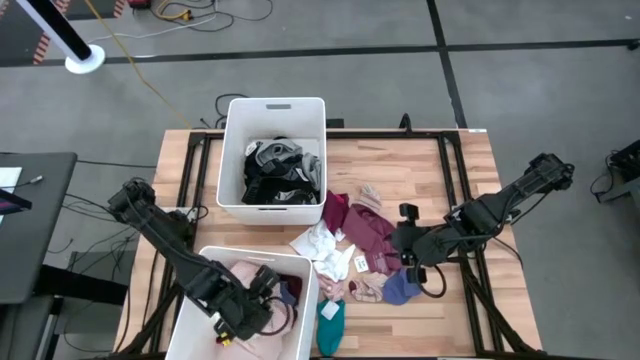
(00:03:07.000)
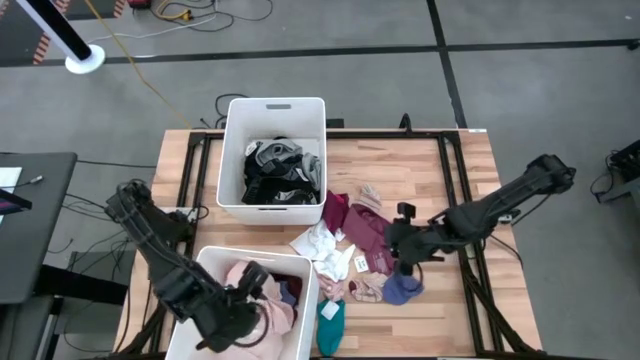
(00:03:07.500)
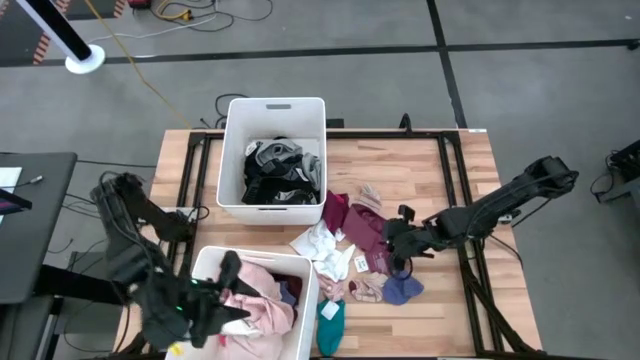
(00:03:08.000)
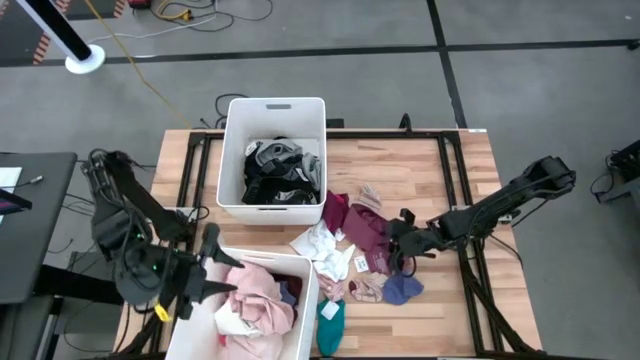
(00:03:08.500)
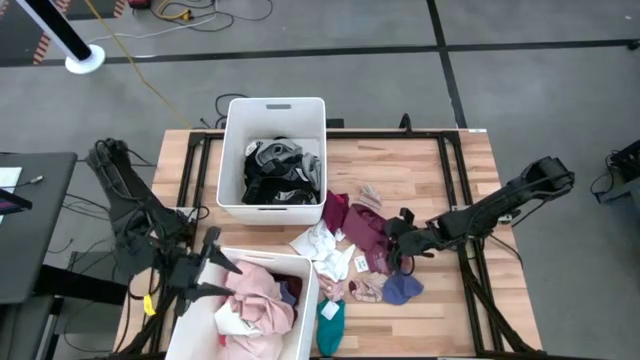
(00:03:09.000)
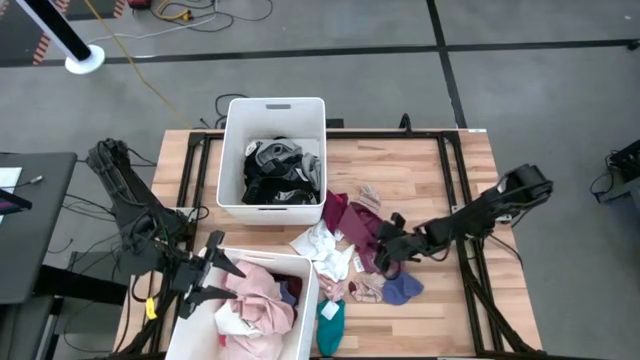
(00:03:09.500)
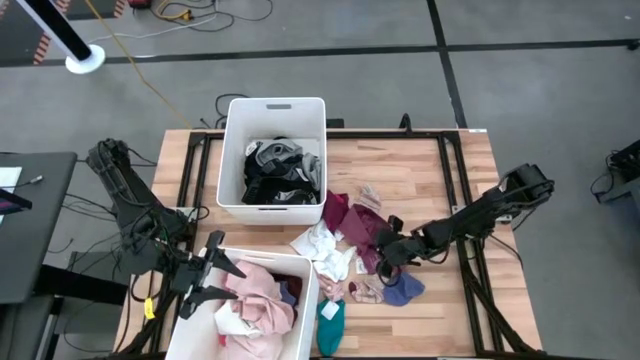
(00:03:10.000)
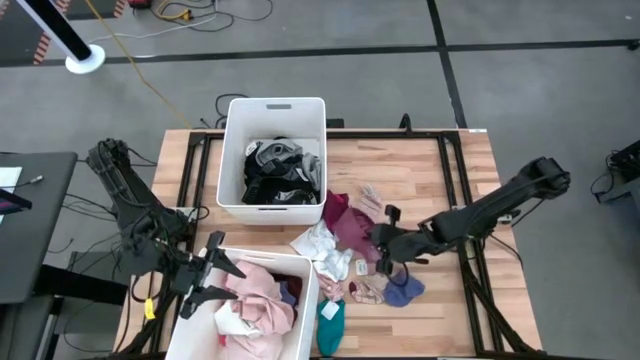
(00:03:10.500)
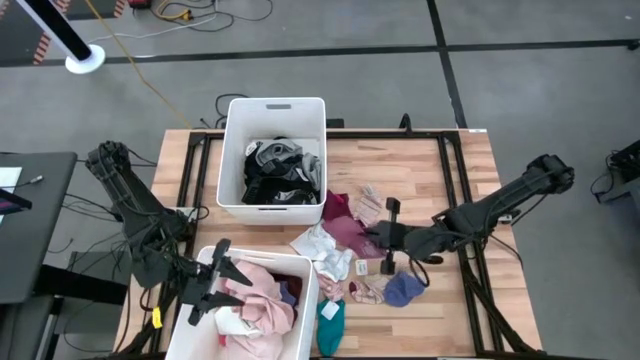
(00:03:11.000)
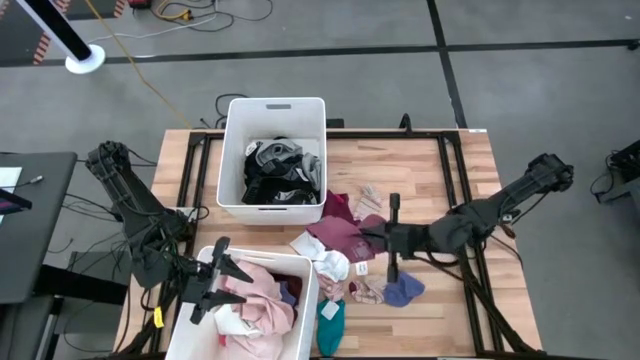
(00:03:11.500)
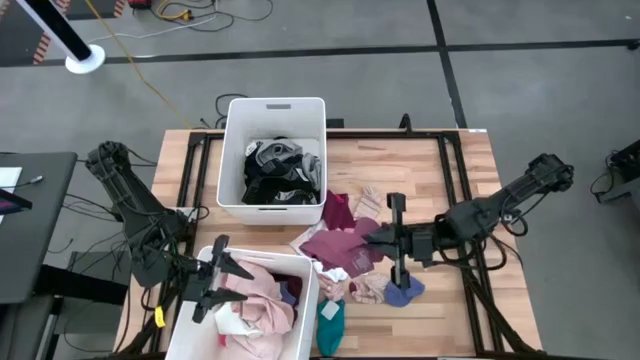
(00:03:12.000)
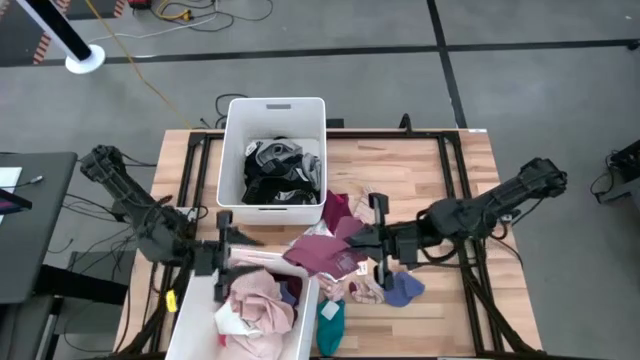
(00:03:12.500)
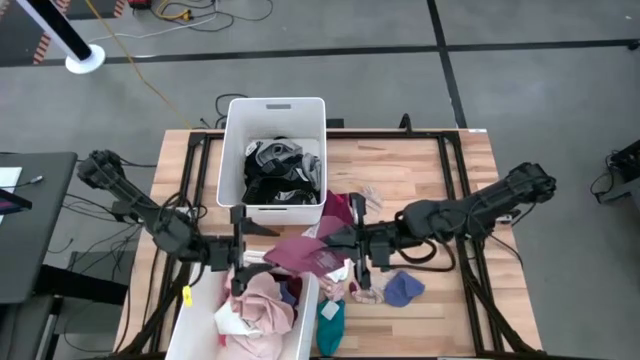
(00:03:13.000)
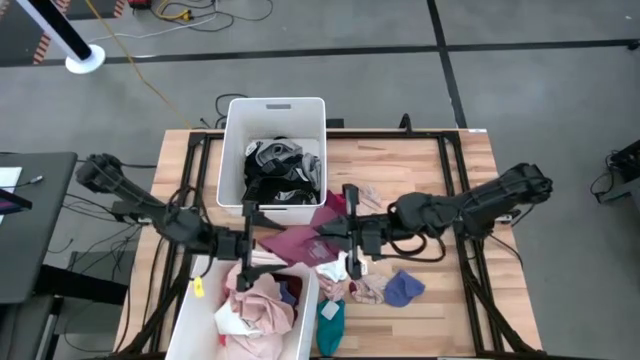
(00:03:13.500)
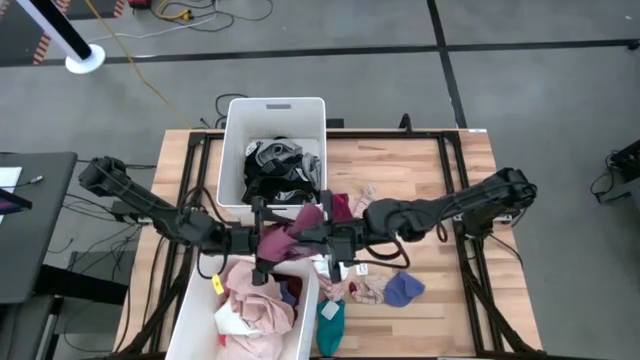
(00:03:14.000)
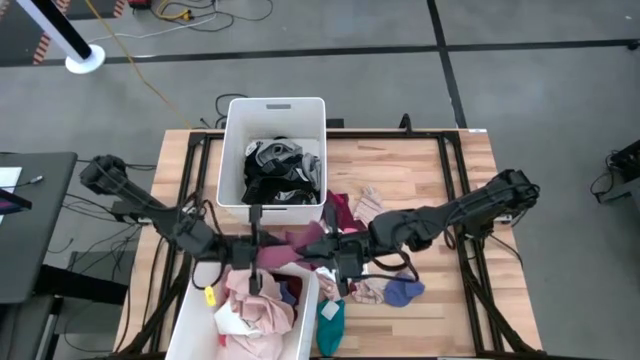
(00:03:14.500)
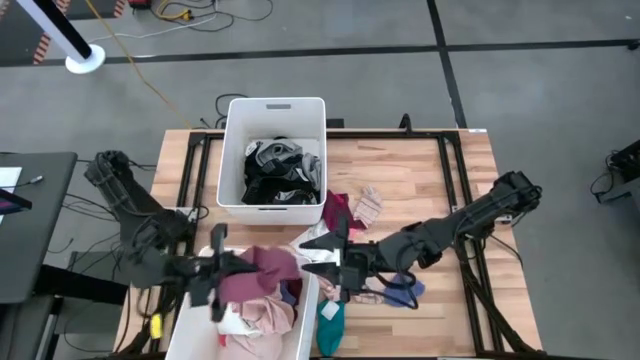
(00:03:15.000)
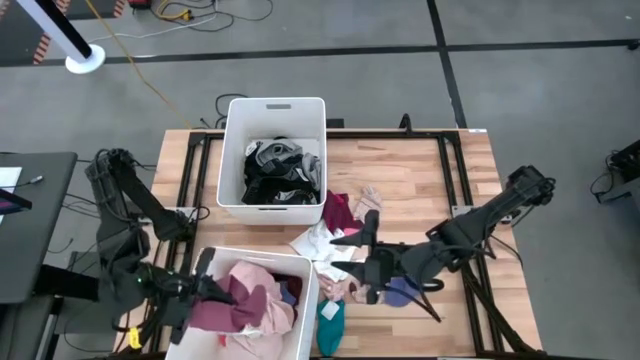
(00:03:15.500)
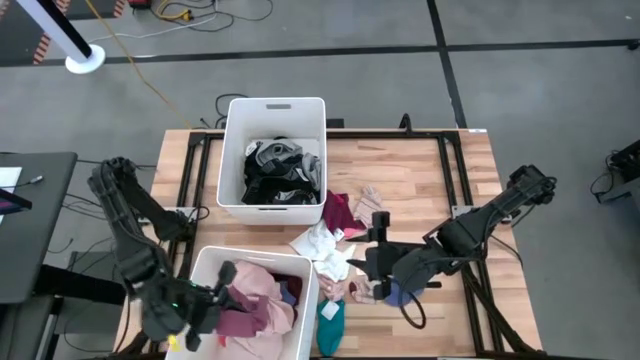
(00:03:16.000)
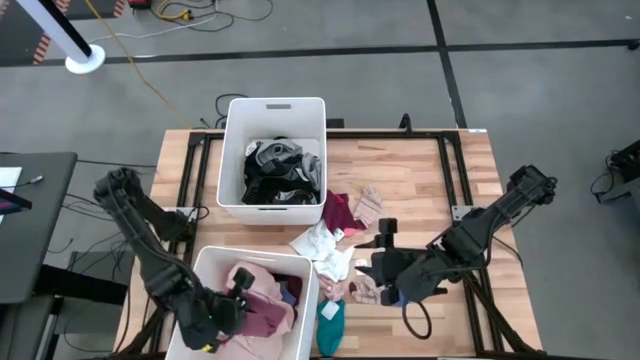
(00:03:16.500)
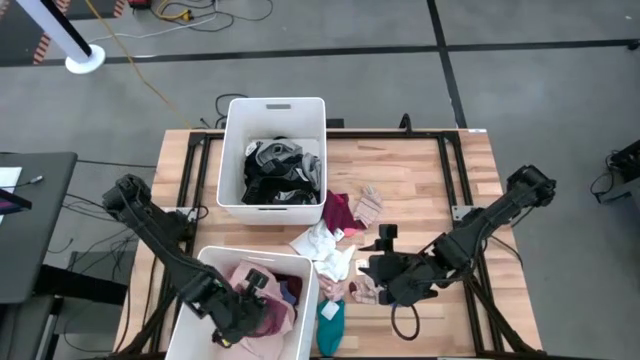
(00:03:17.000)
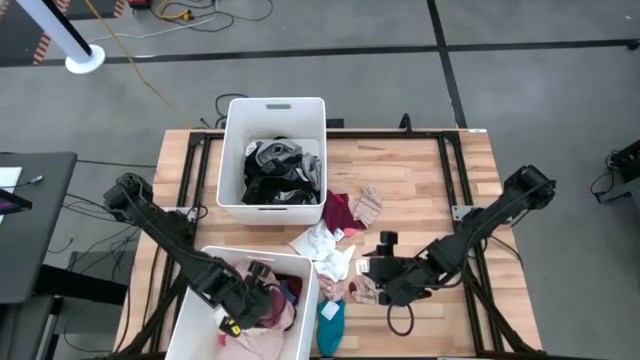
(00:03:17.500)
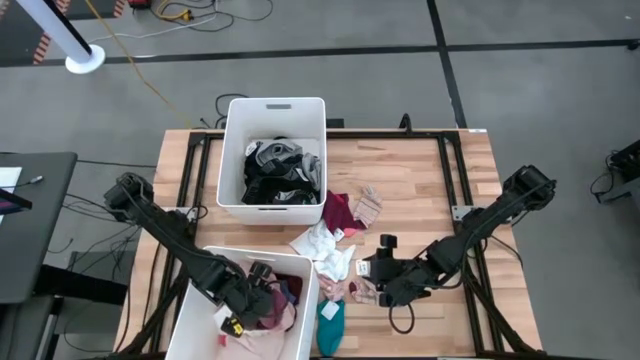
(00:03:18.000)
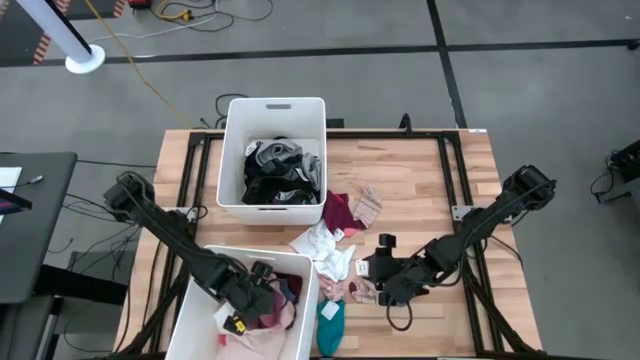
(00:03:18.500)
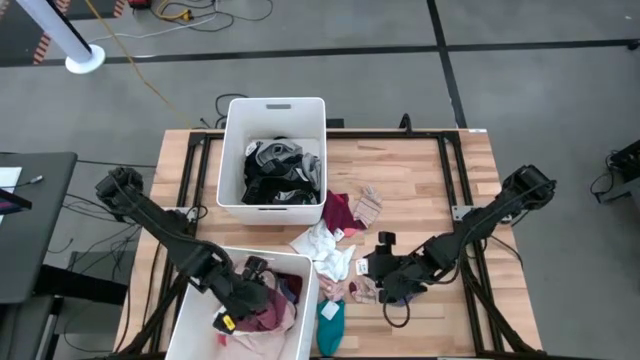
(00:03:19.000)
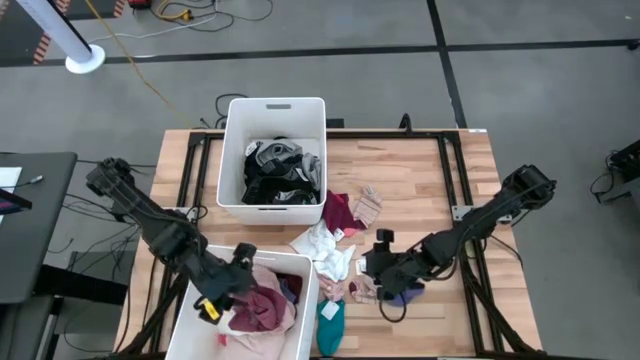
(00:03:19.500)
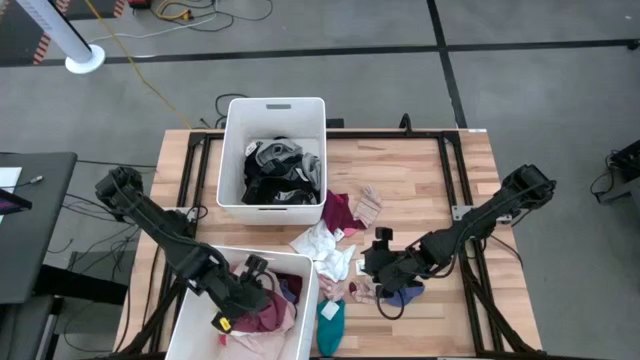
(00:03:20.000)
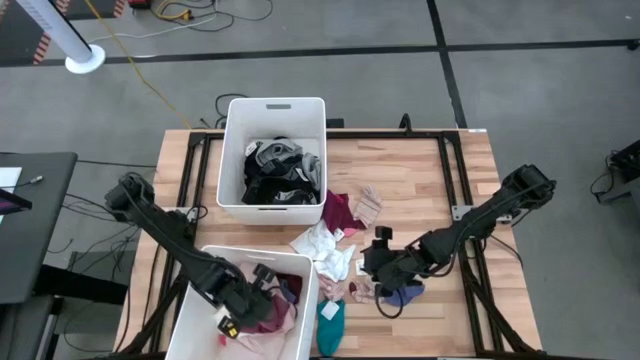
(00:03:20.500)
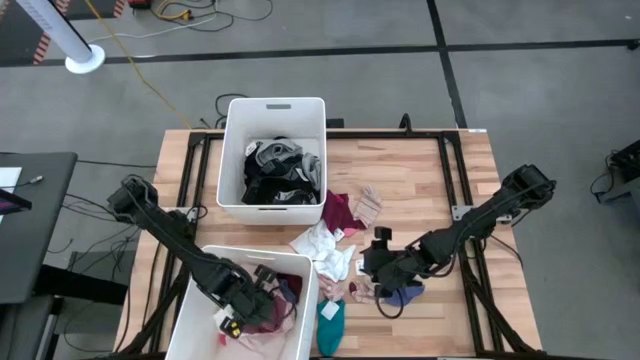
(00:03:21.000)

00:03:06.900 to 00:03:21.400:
Task: Sort clothes
Put the red underwear into the bottom white laundry bin

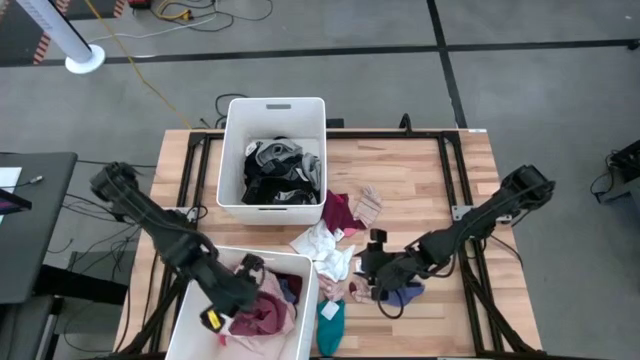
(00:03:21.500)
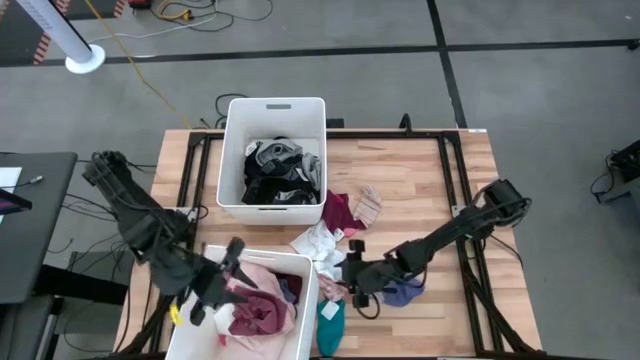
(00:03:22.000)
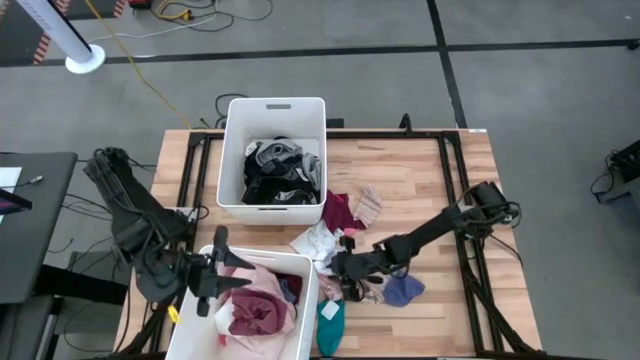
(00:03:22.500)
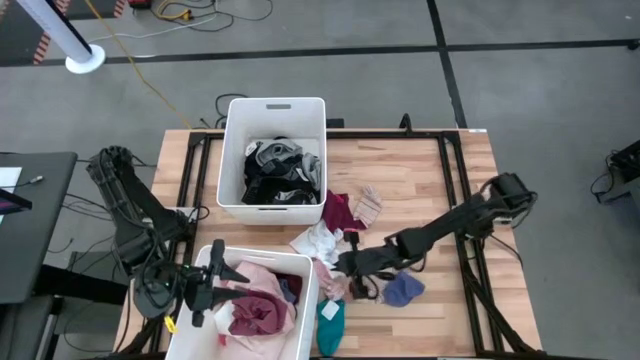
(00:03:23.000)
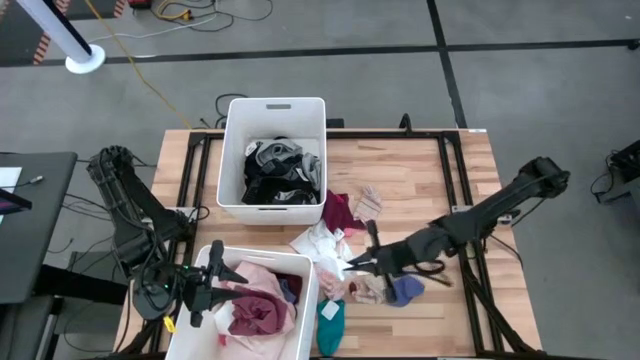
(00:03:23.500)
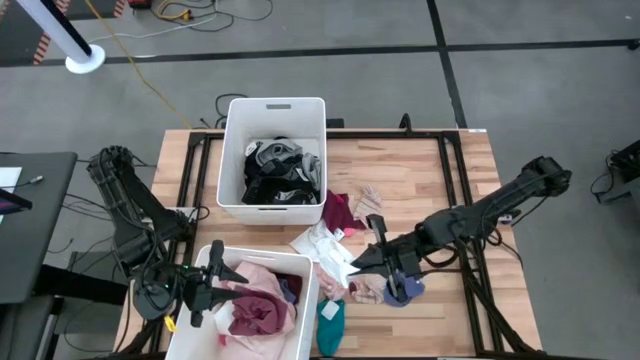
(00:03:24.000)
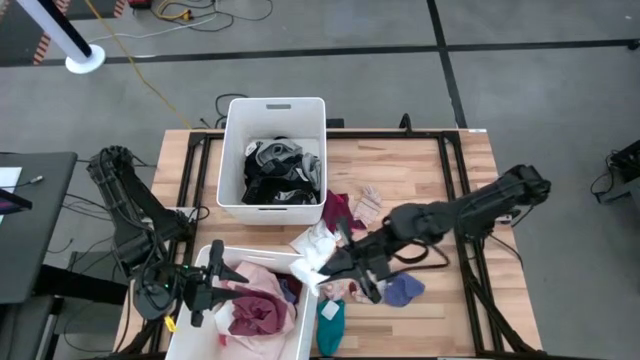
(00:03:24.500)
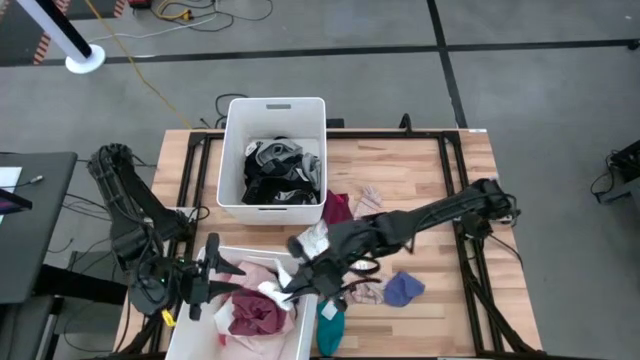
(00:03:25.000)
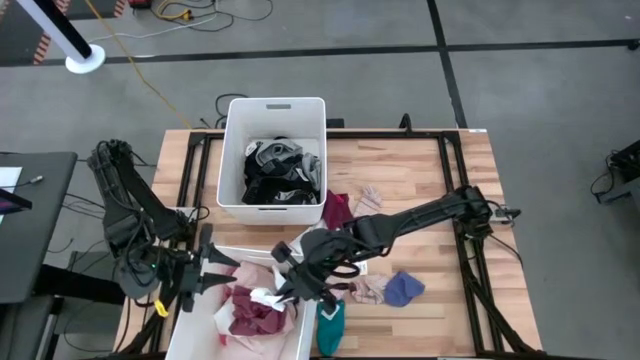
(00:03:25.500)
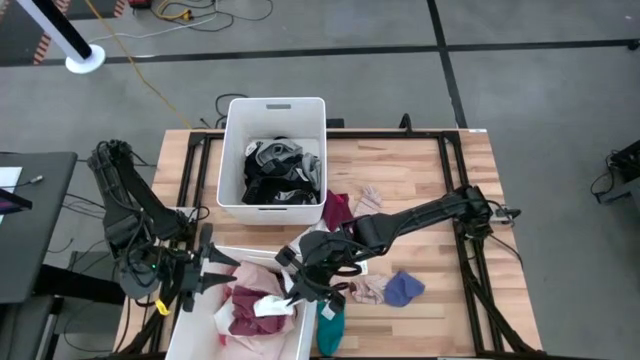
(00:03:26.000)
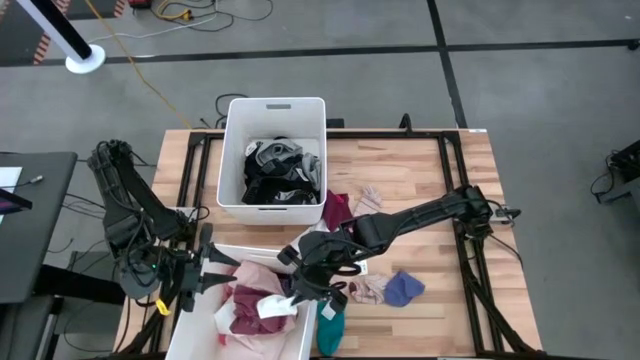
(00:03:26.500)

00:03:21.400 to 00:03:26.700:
Put the white sock into the bottom white laundry bin
